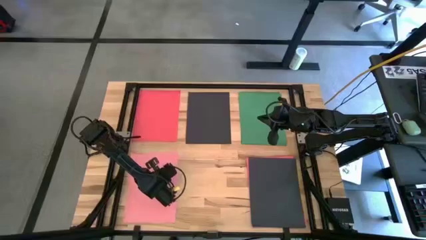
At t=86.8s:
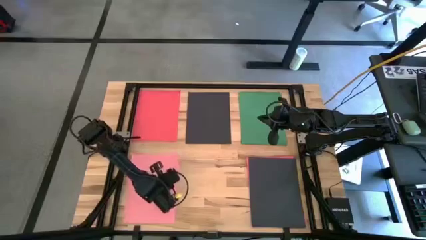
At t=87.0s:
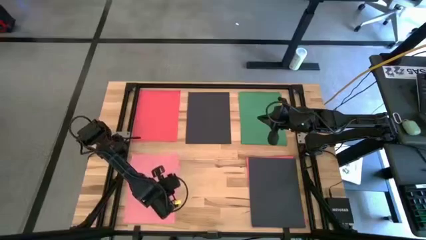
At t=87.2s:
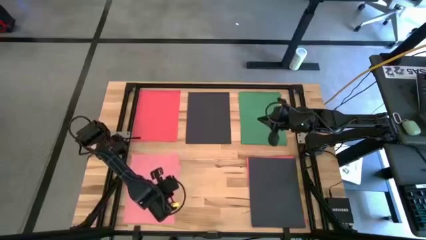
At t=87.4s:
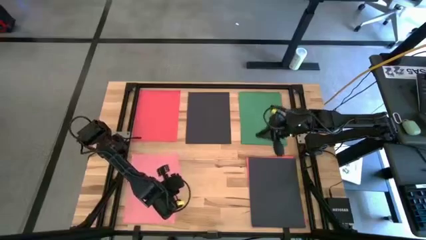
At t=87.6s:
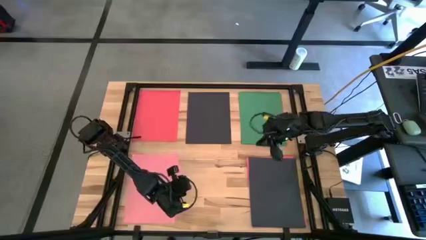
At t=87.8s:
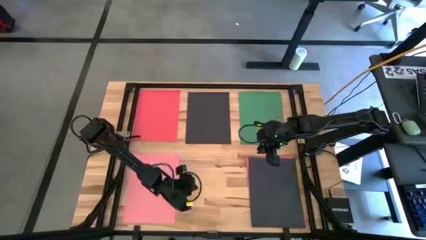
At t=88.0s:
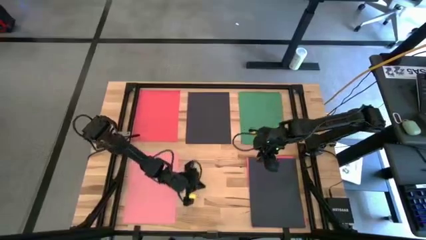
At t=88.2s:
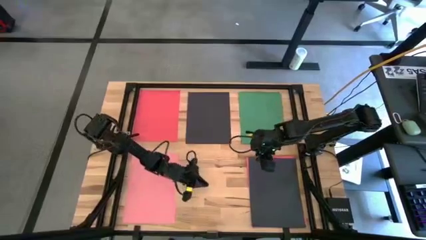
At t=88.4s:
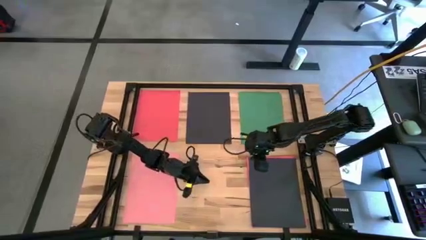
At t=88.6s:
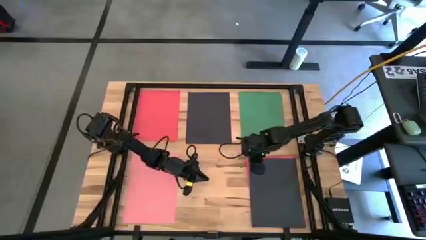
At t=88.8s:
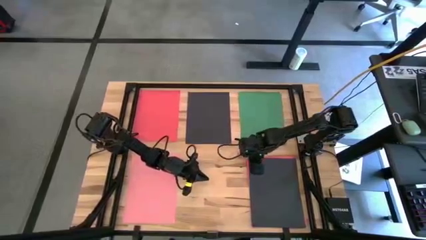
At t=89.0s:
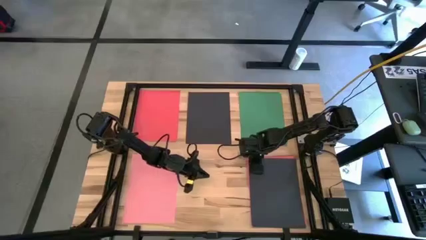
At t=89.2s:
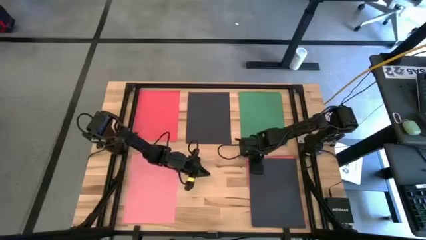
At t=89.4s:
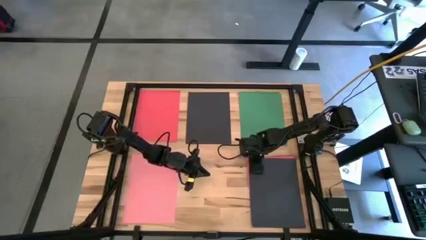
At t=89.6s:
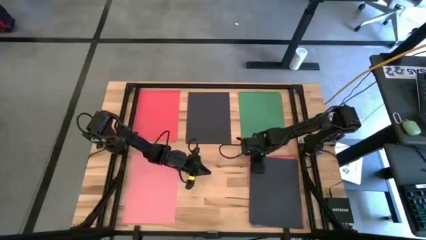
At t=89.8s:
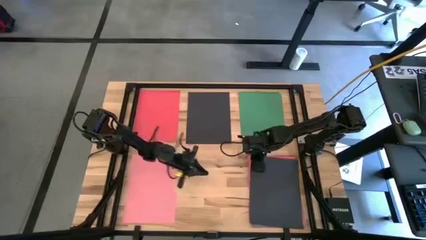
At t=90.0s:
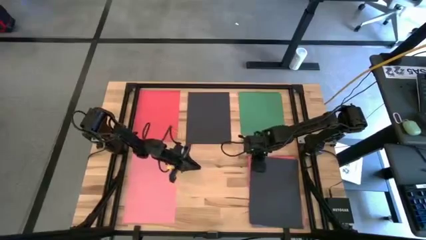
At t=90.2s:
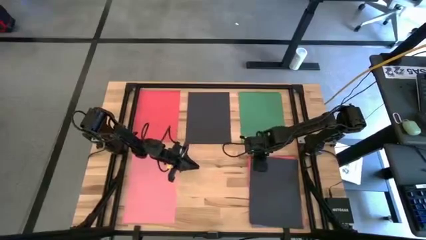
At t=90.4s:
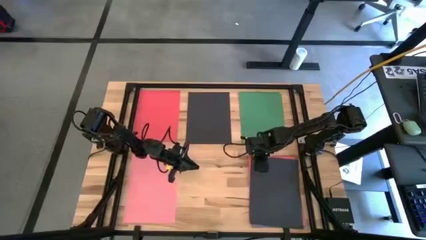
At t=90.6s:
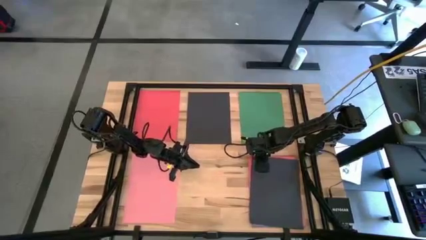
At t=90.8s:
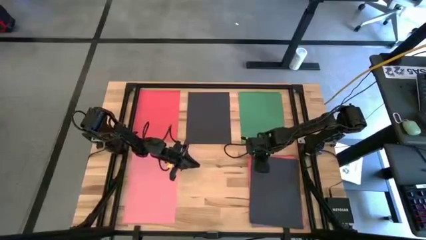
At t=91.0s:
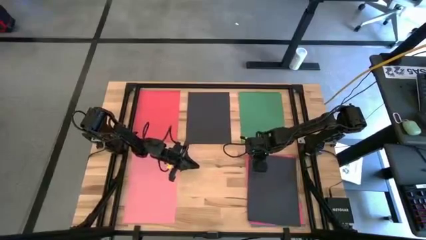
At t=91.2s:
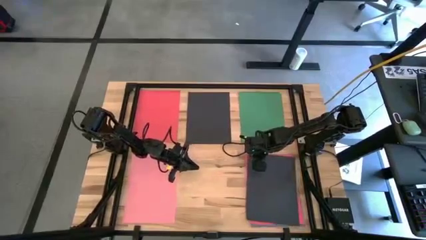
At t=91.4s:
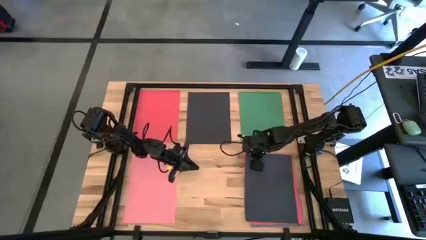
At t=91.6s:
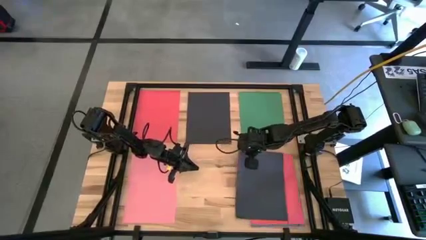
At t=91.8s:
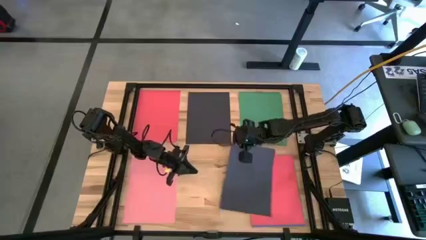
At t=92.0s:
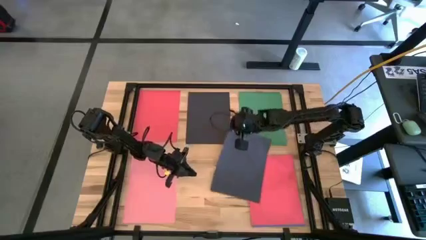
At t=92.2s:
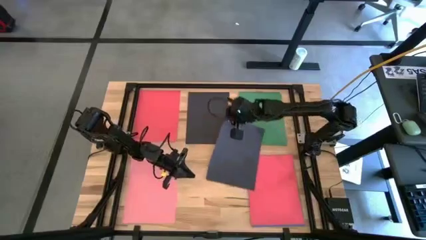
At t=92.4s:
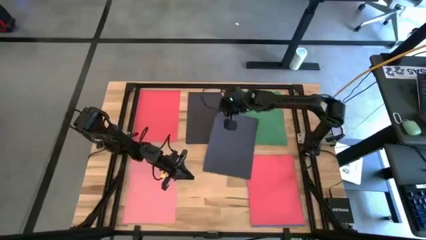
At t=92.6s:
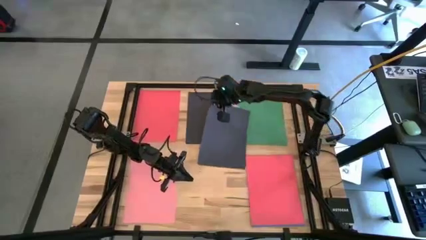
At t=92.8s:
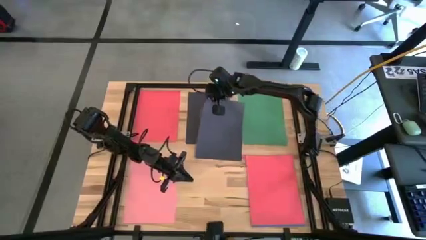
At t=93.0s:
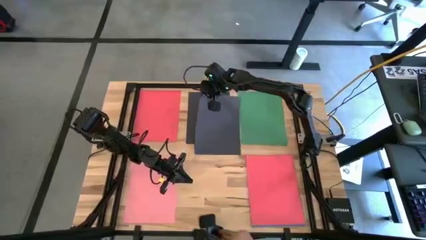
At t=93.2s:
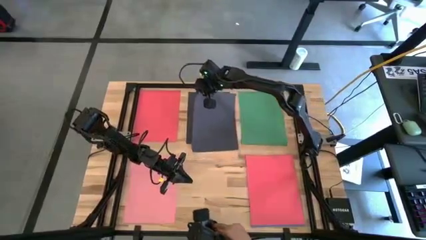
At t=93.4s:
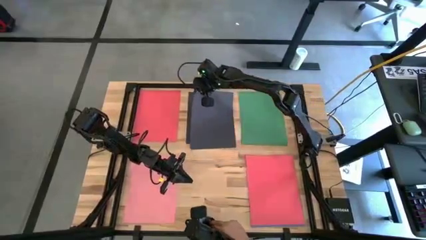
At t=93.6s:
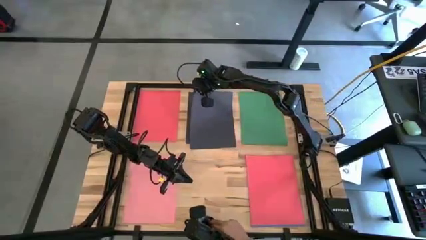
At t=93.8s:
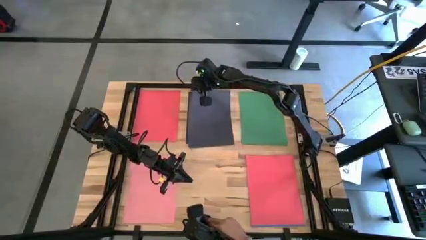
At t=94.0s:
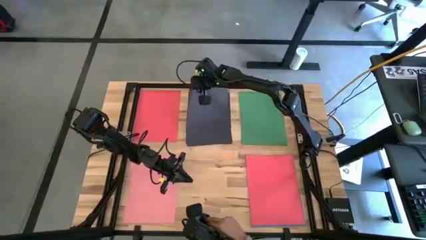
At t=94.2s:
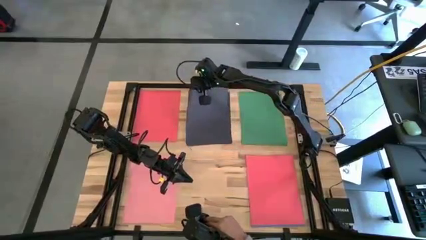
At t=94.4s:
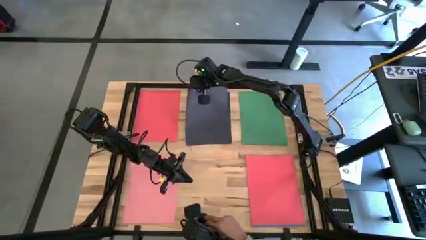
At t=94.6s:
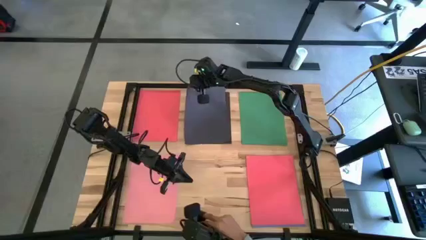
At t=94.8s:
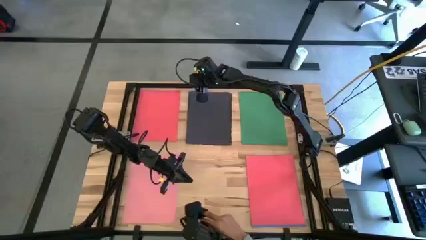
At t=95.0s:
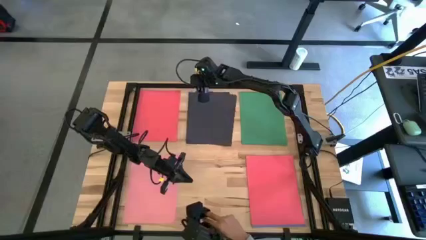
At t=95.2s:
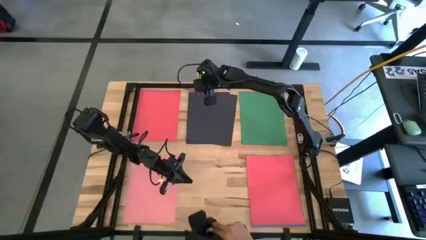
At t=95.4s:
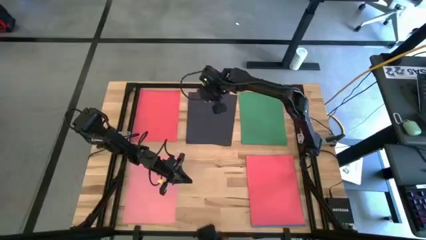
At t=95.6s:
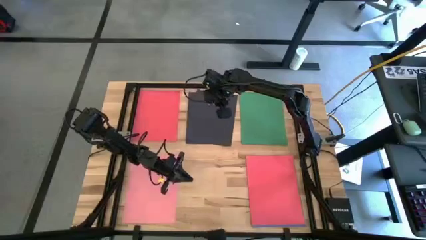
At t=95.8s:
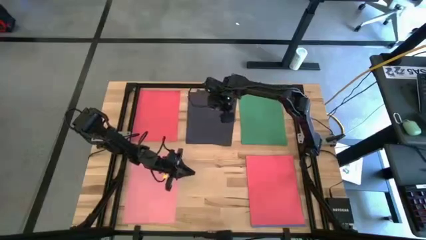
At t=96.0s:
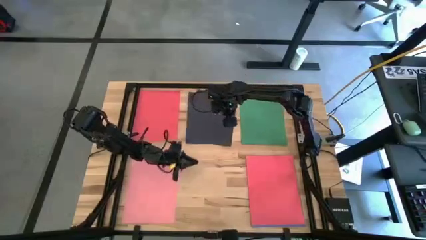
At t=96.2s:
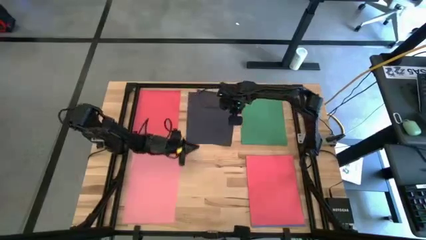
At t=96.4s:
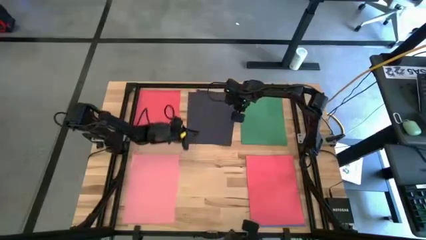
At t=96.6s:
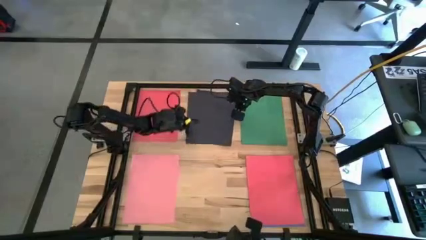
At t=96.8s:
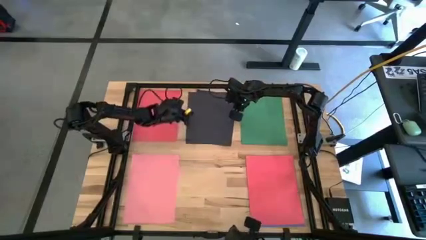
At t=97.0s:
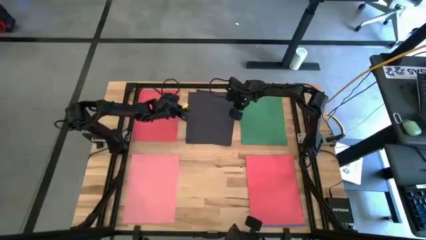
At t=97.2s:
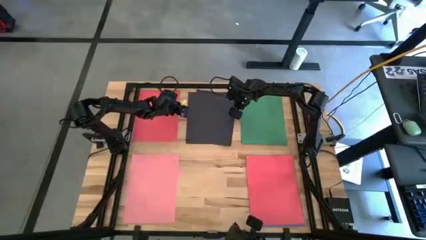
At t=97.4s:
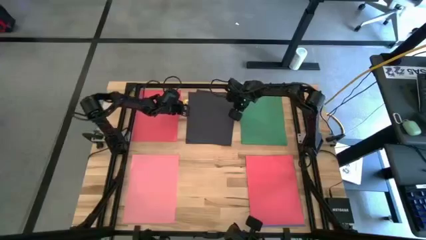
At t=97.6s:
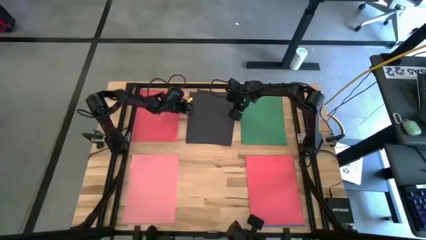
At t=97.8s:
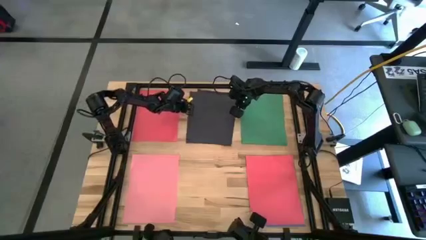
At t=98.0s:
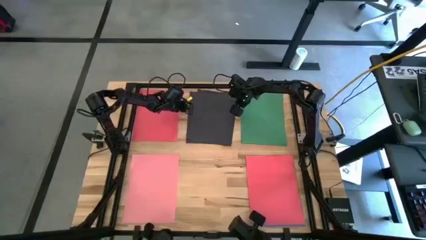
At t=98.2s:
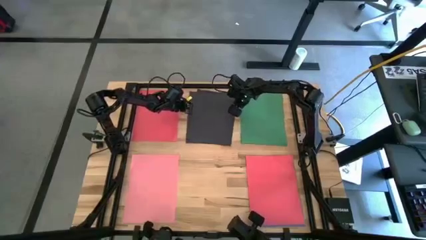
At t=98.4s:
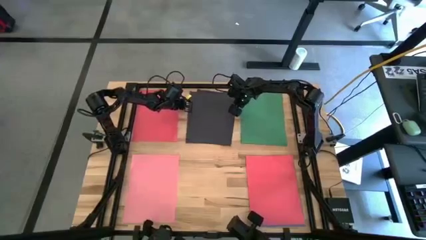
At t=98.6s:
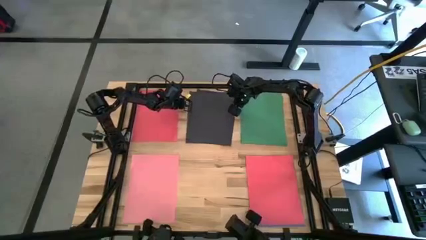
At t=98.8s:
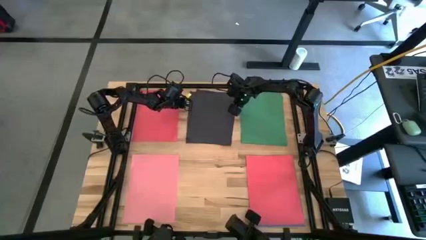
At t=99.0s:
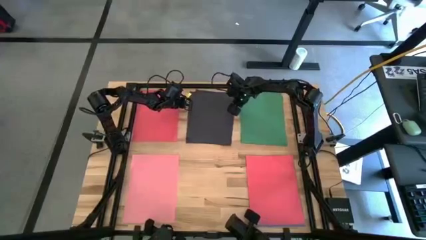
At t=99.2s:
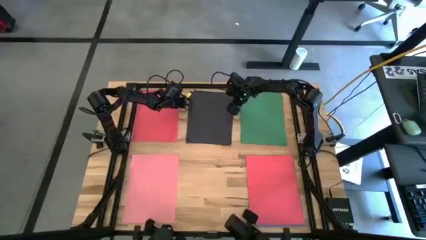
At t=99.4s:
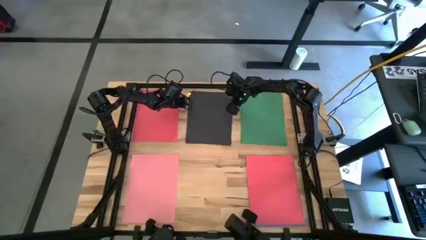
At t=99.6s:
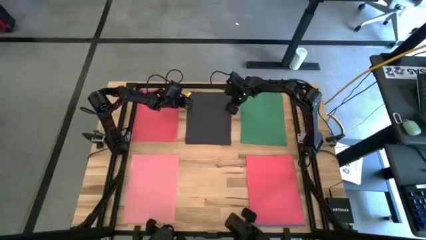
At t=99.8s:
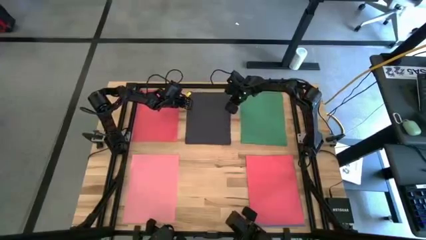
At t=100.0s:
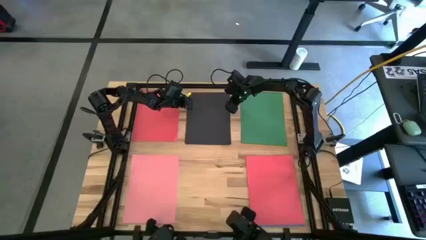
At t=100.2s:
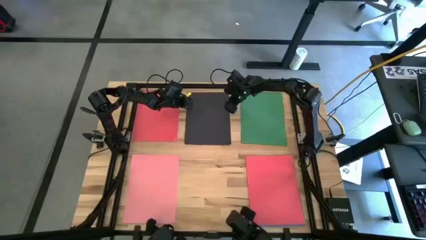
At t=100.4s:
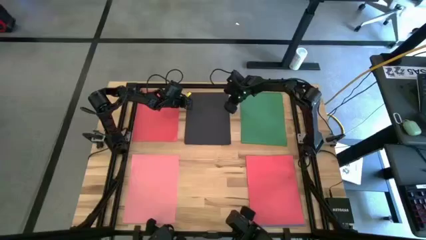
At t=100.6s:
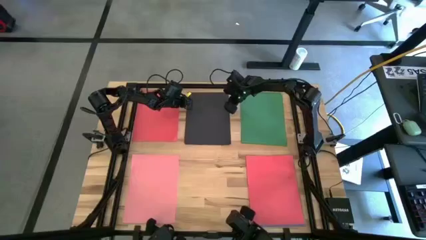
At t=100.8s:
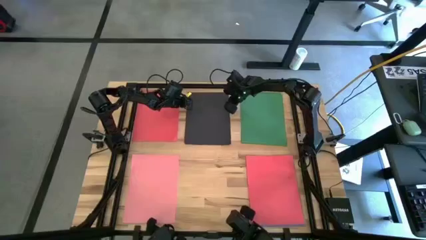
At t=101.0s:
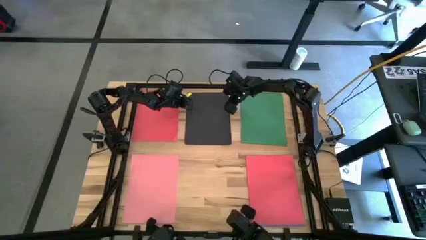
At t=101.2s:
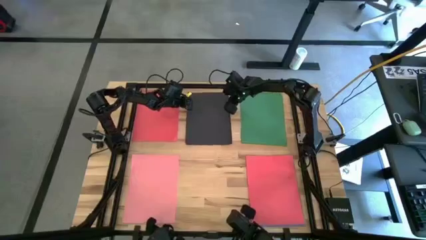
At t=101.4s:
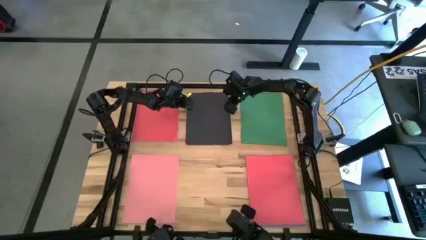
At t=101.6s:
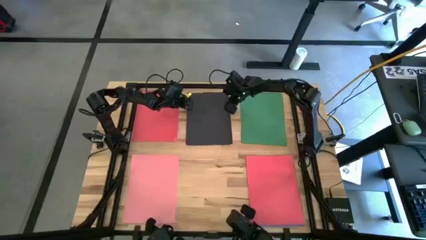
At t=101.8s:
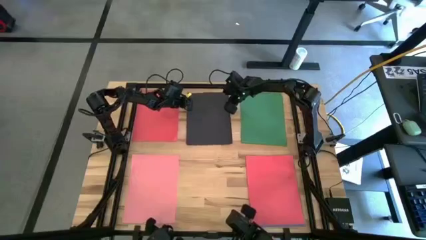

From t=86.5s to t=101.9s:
Task: Organize paper
Stack the black paper on the black paper at the top center of the table
